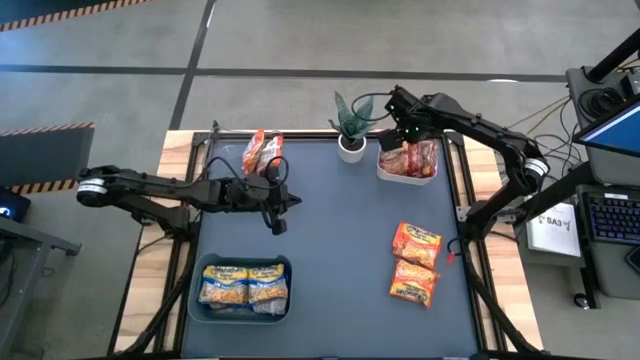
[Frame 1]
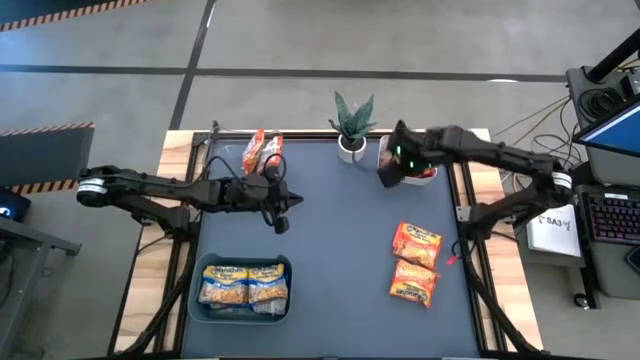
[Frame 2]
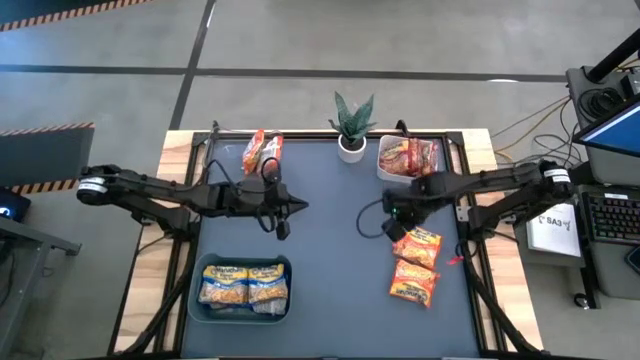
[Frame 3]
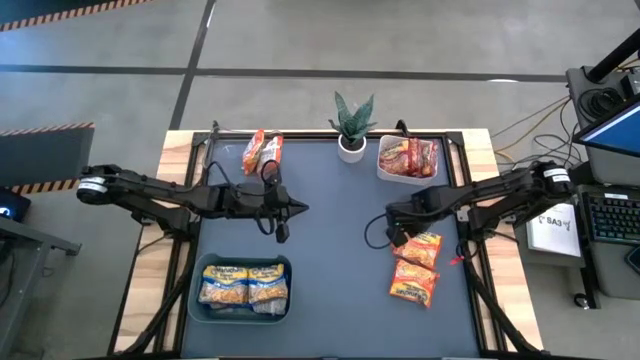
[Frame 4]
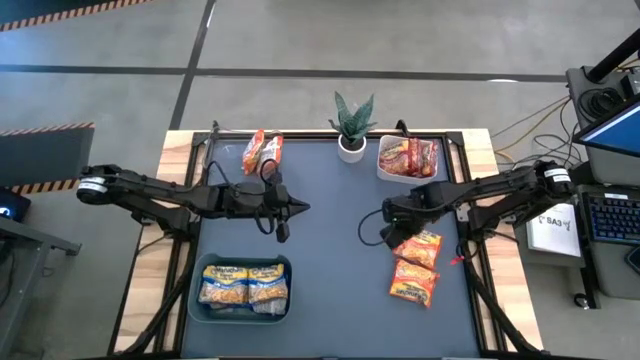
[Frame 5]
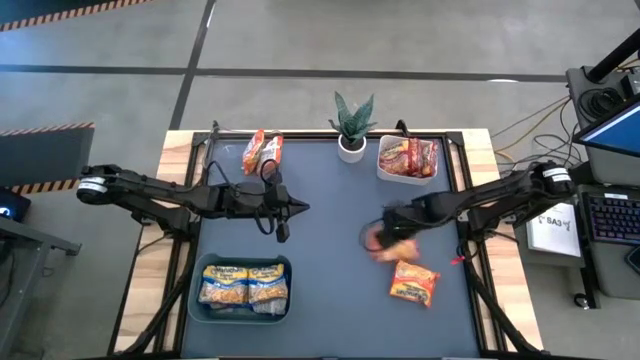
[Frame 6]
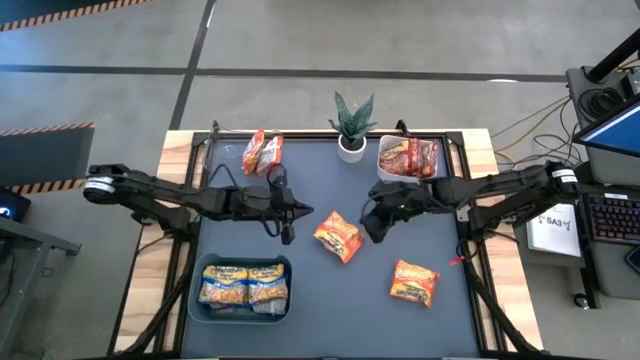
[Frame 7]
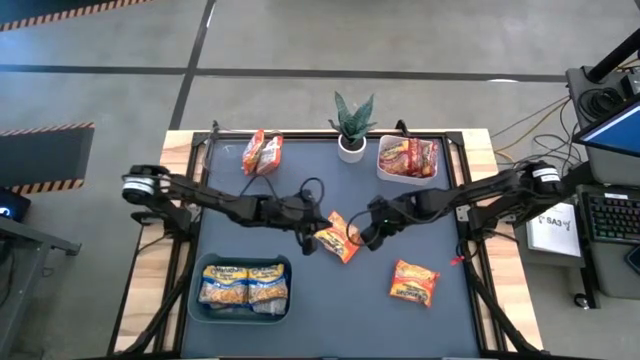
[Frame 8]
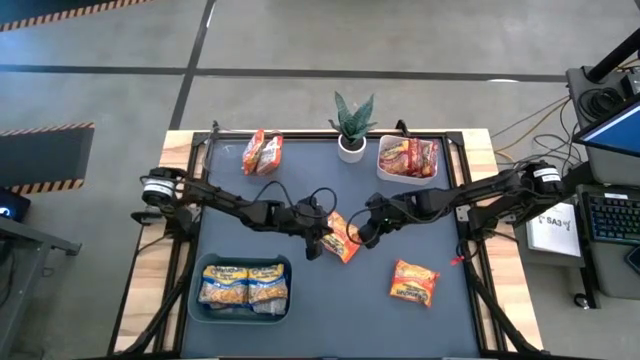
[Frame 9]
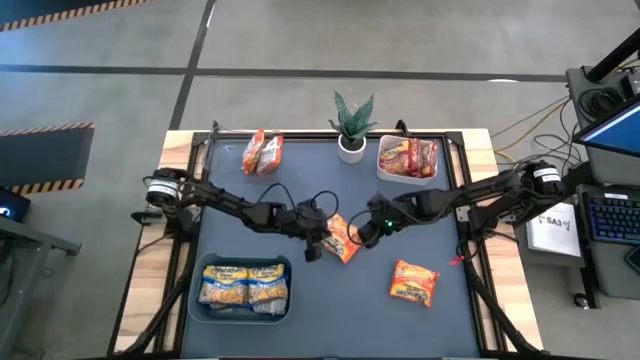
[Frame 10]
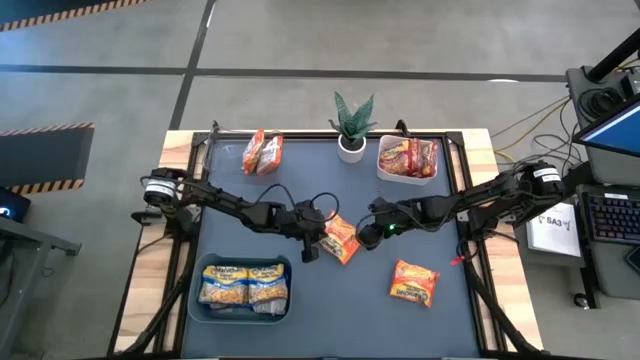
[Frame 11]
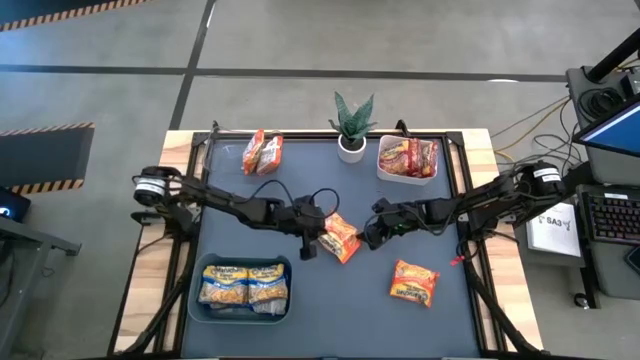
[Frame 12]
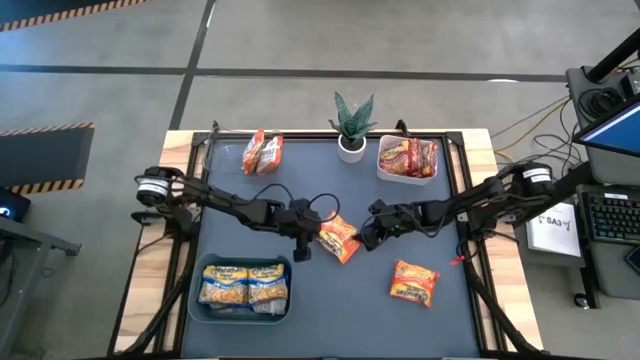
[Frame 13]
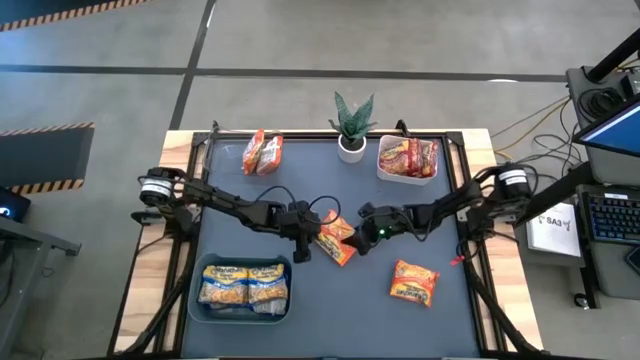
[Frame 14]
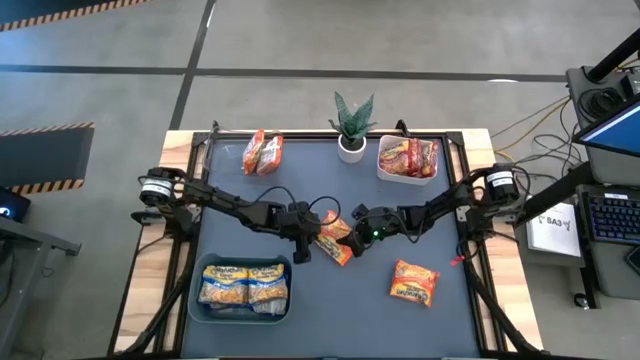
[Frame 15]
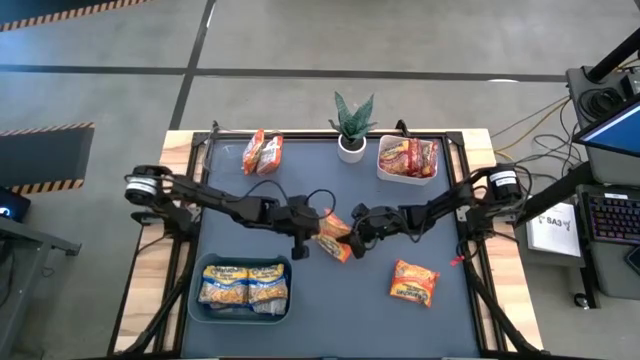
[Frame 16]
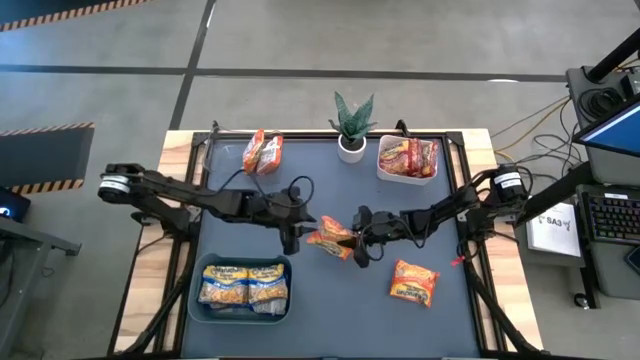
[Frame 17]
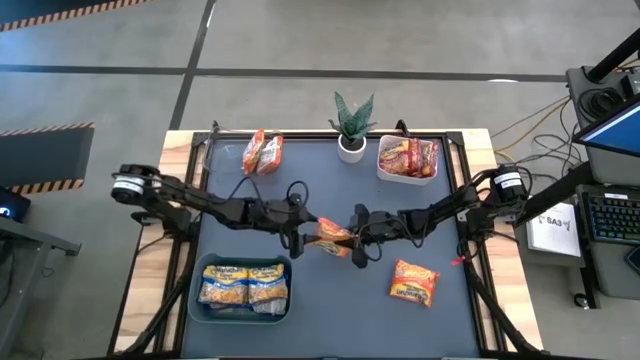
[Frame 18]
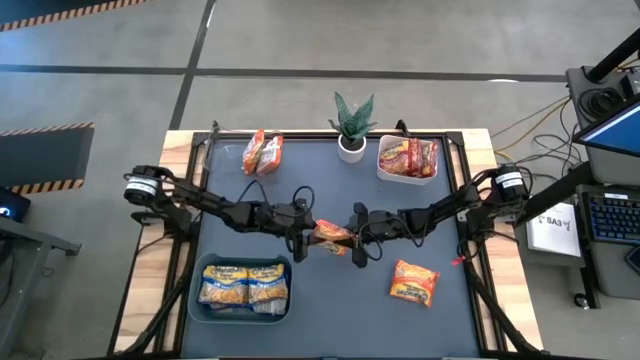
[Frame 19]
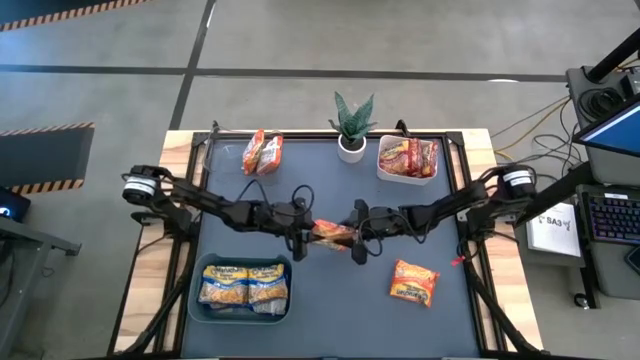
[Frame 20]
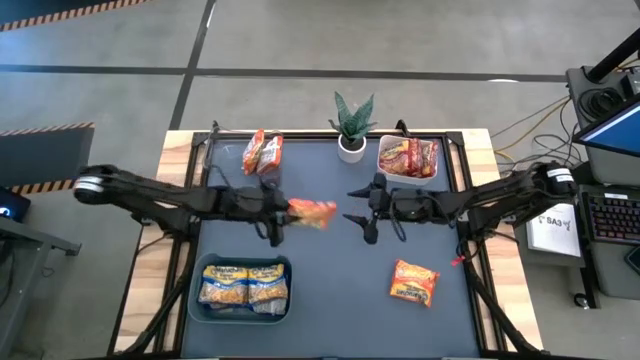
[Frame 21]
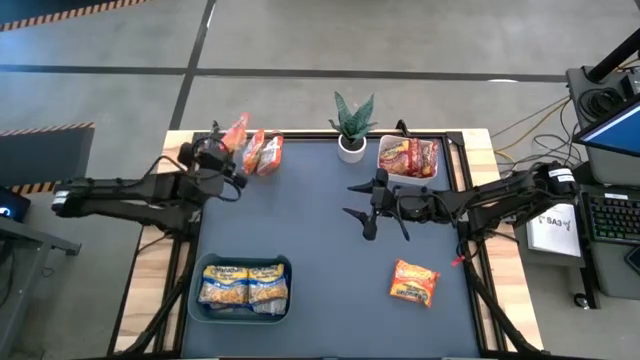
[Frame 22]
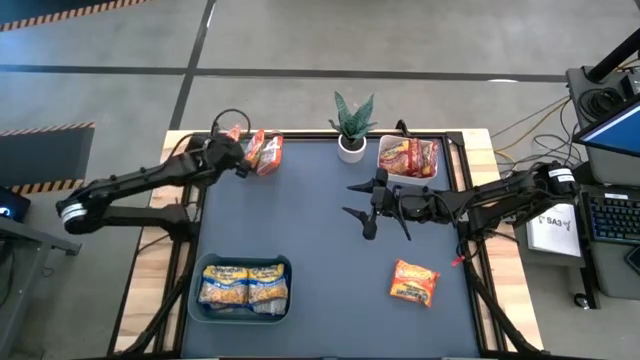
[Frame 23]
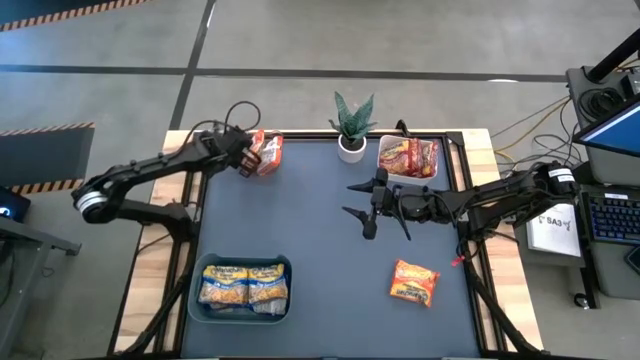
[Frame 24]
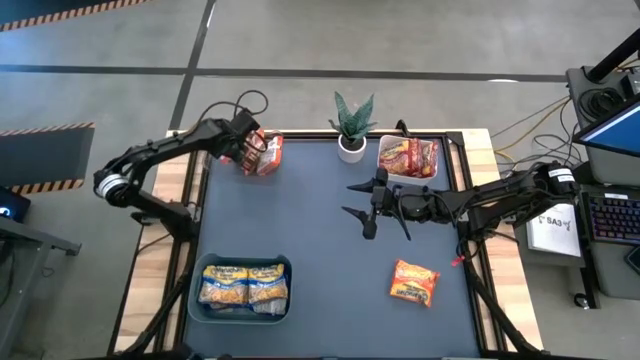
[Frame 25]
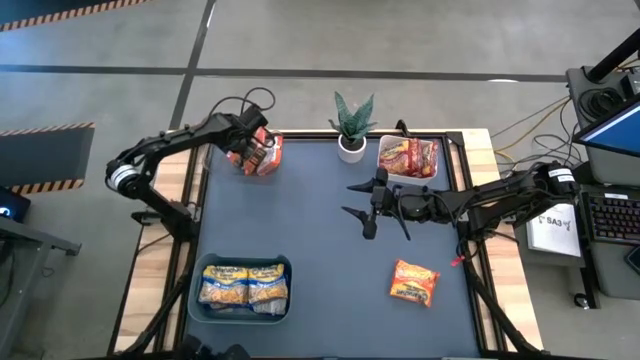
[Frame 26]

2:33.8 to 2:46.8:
Task: Sort Maruchan noodles
Put the orange noodle pack into the transparent bin

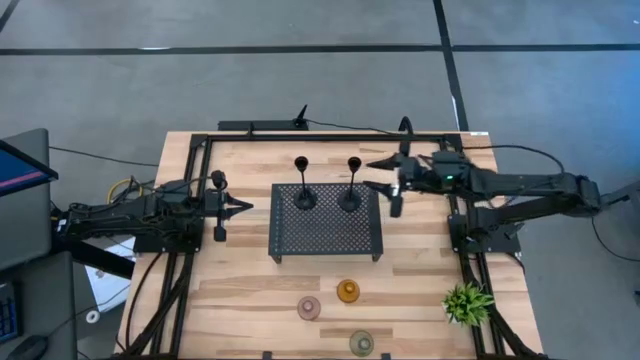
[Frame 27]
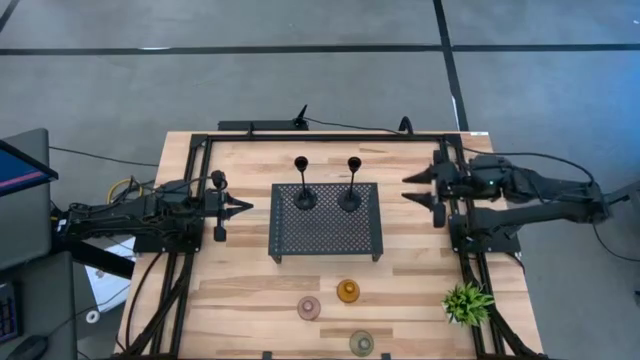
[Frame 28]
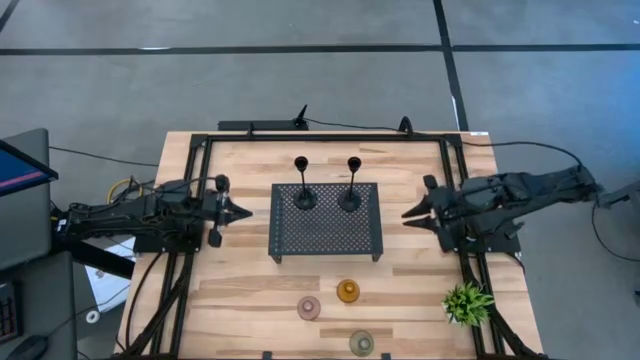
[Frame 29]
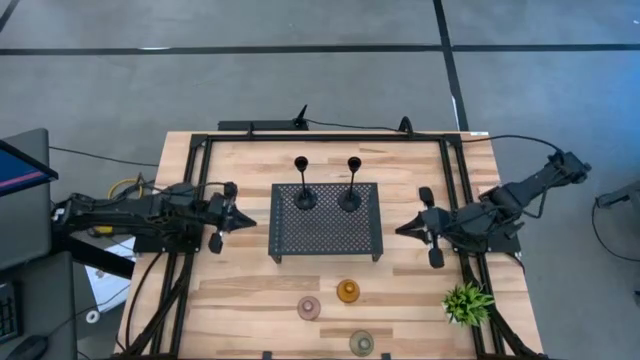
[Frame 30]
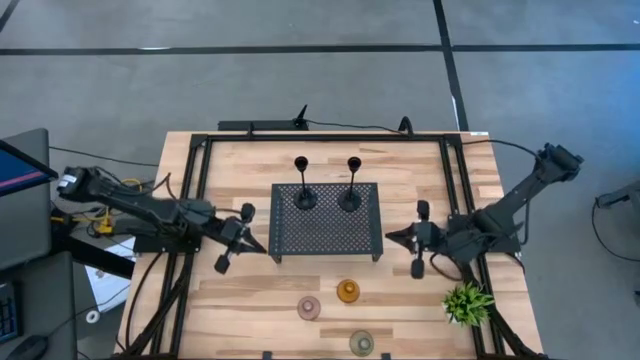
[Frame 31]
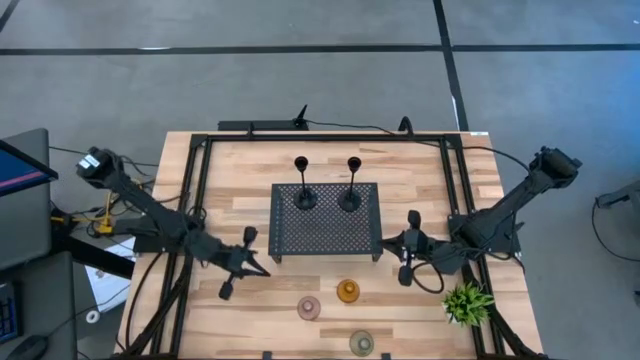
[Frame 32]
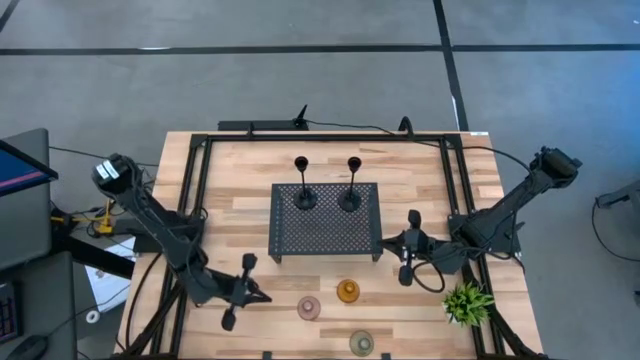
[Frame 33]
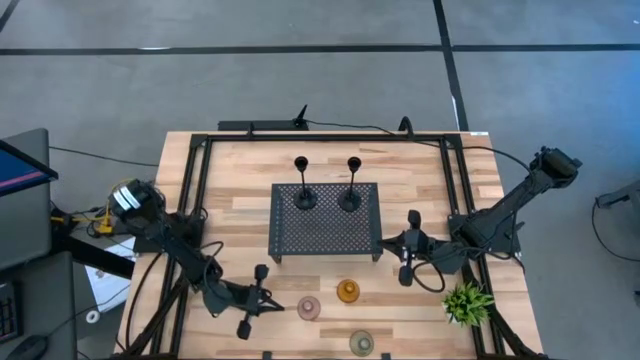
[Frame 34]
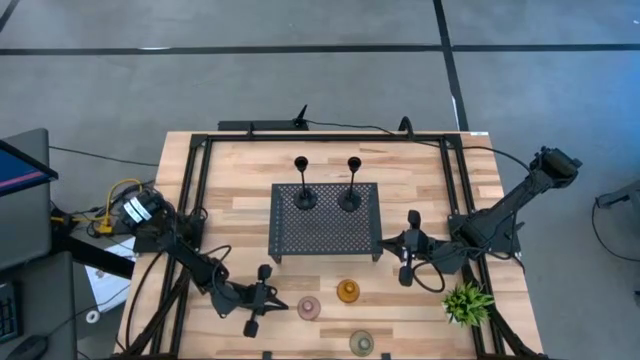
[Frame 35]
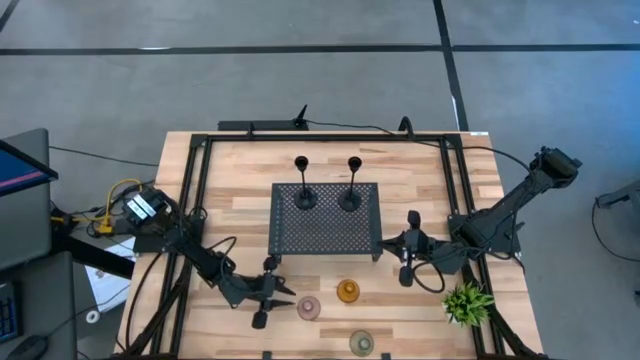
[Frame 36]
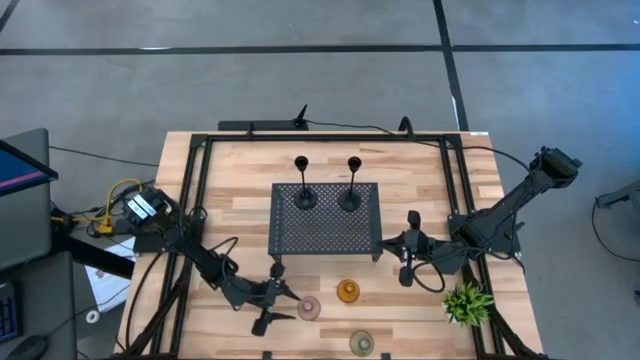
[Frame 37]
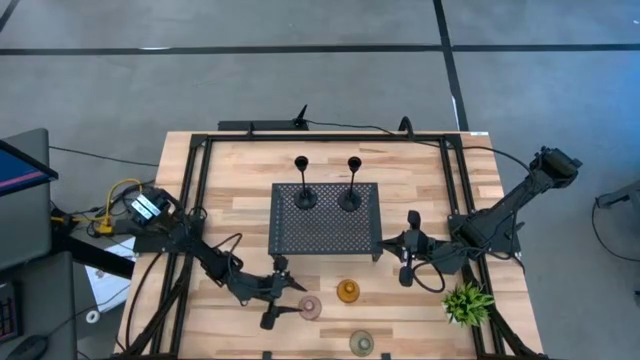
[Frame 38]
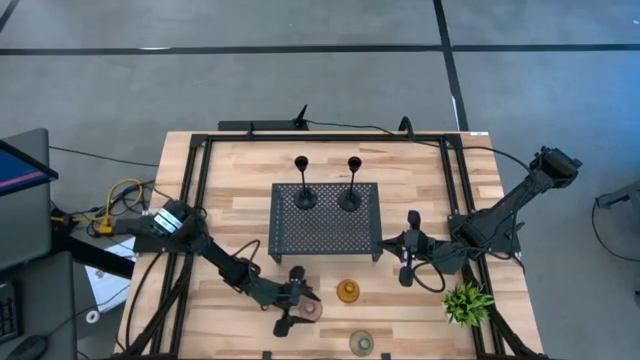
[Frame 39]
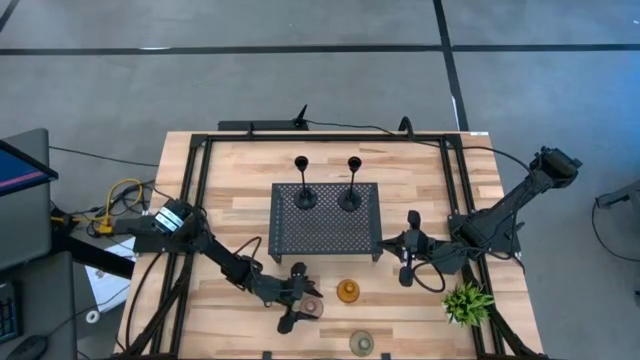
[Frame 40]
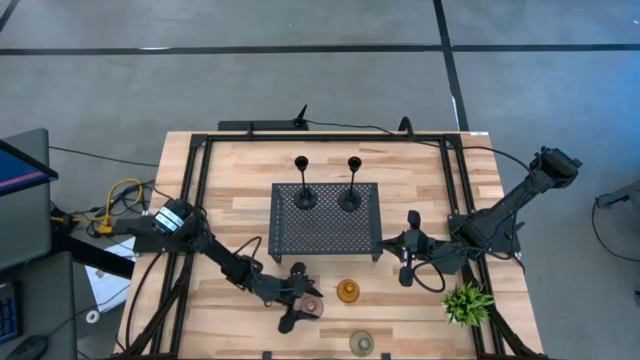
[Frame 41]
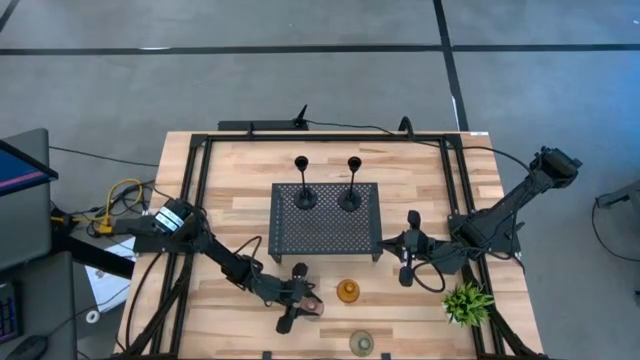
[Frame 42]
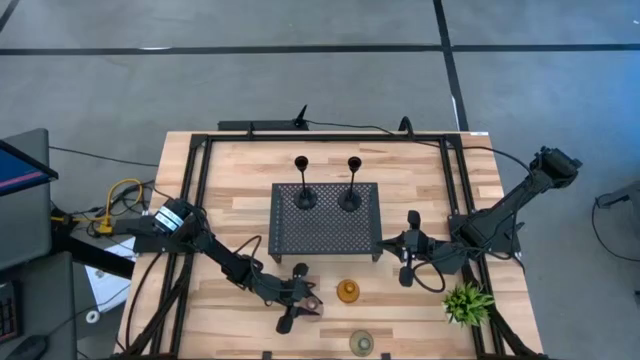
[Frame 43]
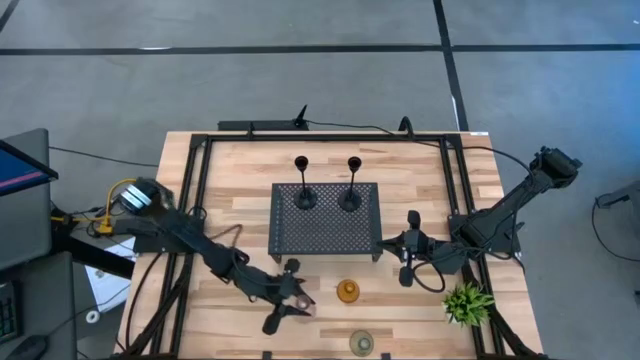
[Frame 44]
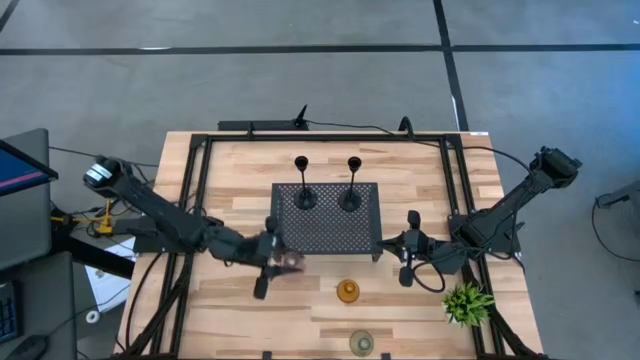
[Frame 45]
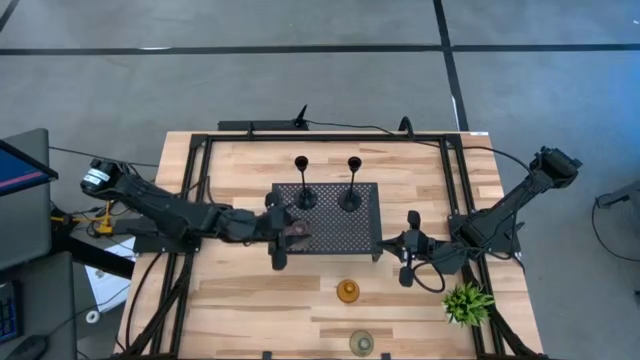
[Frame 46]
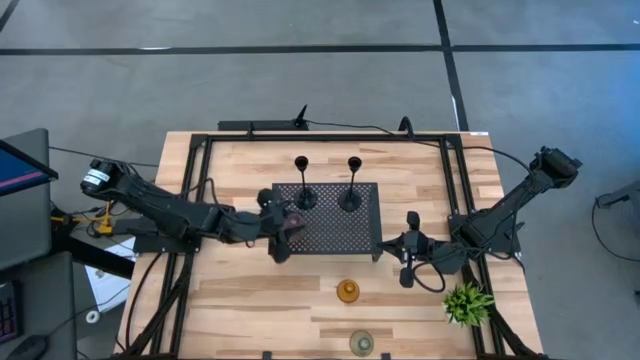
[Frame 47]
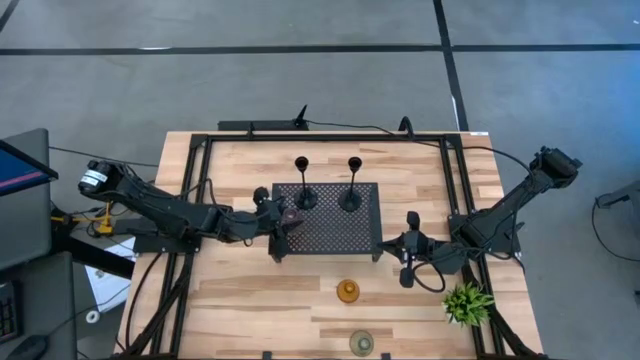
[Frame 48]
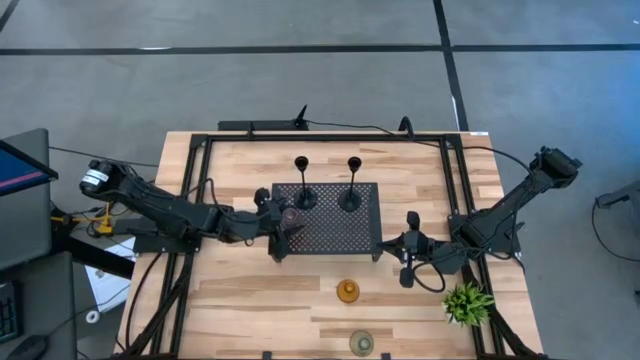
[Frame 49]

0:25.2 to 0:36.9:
Task: Pick & Place candle stick holders
Put the pink glass candle holder on the shelf
